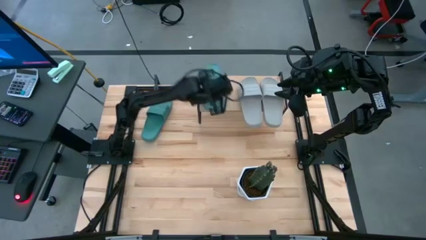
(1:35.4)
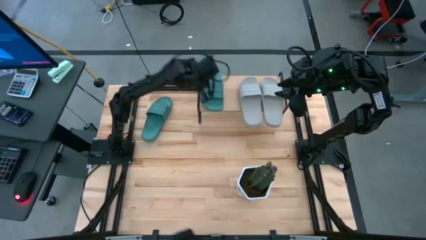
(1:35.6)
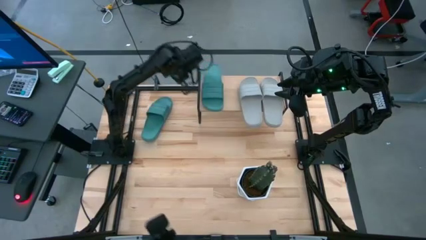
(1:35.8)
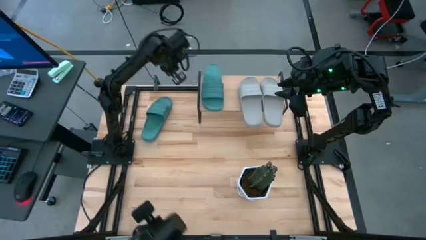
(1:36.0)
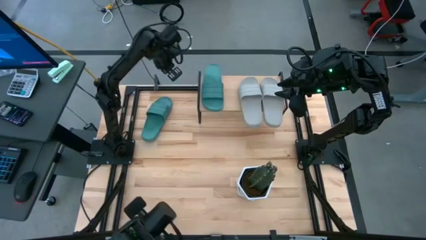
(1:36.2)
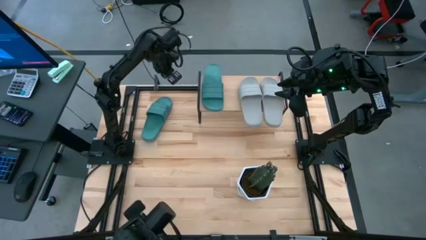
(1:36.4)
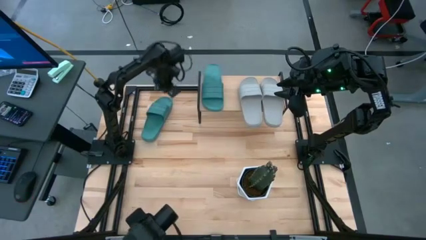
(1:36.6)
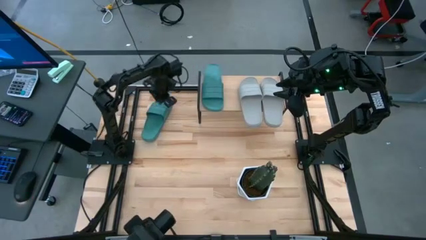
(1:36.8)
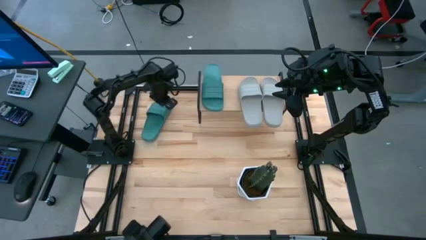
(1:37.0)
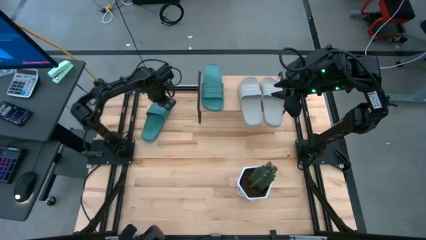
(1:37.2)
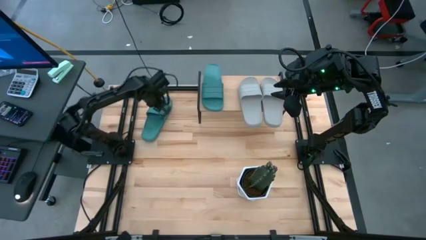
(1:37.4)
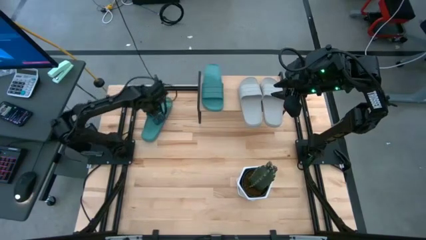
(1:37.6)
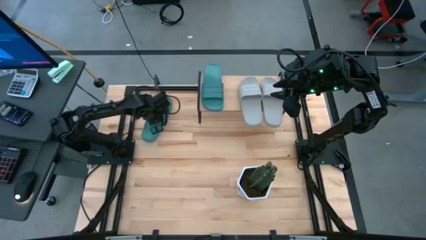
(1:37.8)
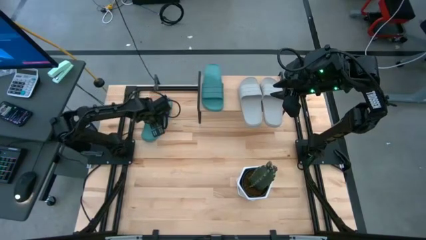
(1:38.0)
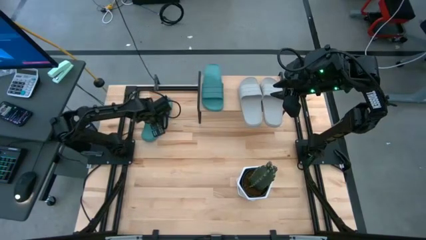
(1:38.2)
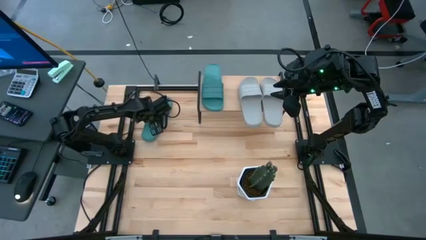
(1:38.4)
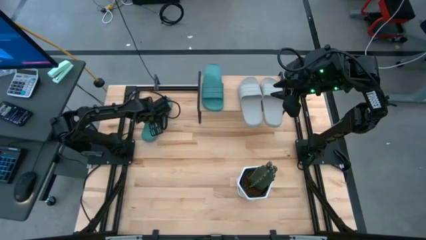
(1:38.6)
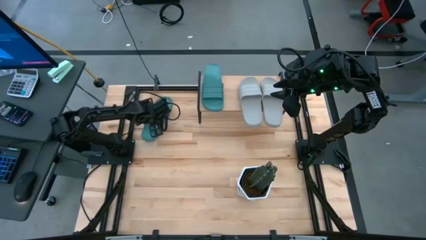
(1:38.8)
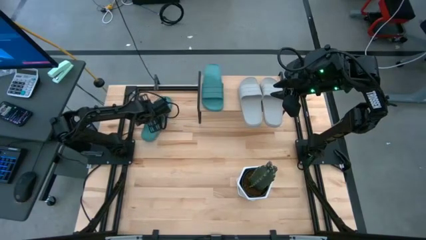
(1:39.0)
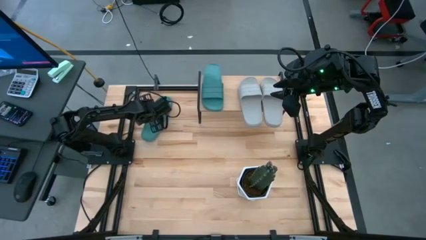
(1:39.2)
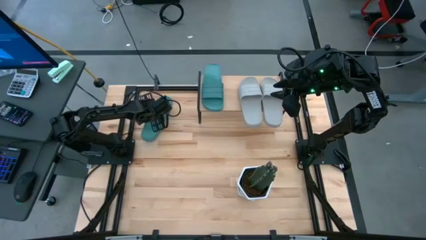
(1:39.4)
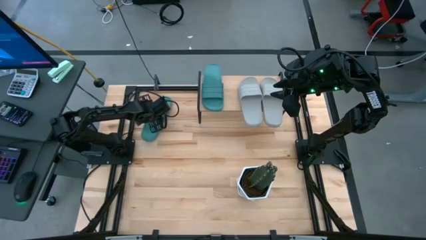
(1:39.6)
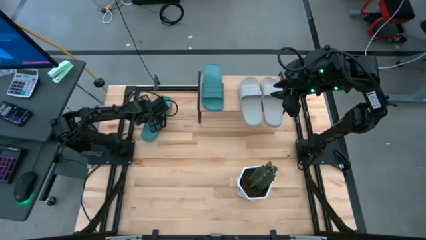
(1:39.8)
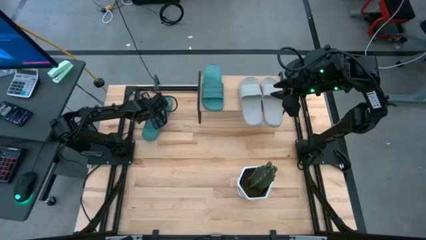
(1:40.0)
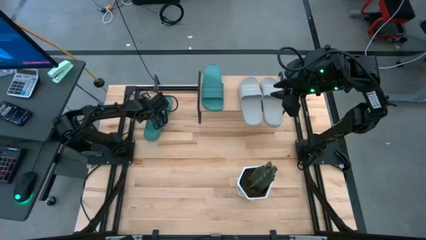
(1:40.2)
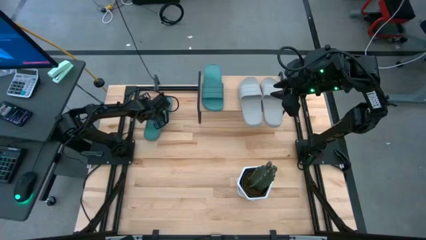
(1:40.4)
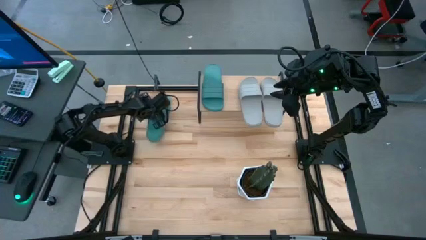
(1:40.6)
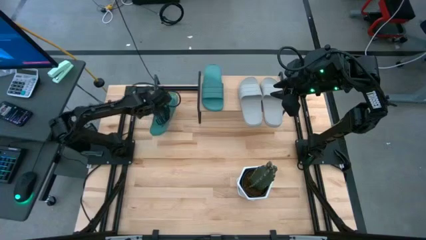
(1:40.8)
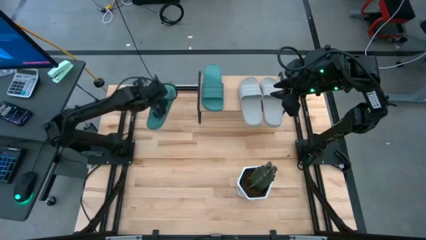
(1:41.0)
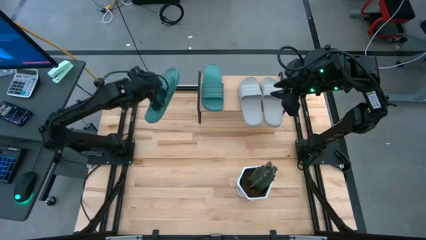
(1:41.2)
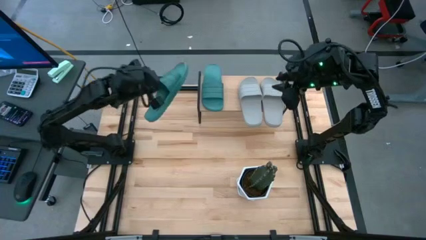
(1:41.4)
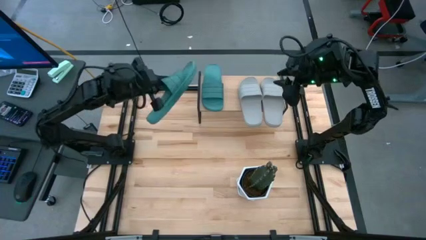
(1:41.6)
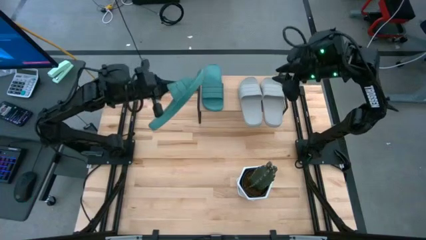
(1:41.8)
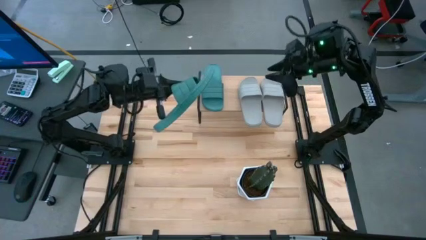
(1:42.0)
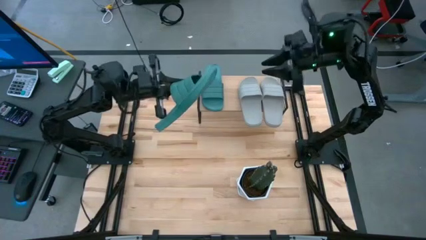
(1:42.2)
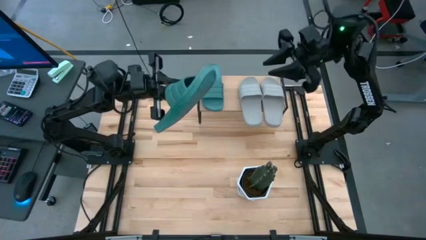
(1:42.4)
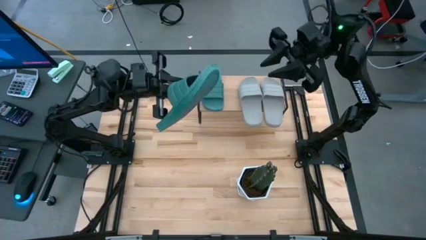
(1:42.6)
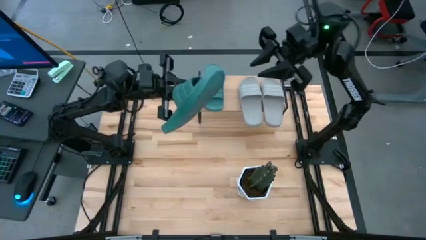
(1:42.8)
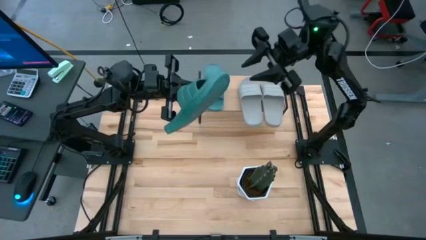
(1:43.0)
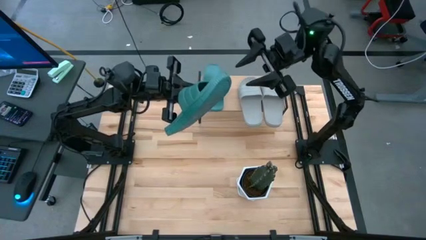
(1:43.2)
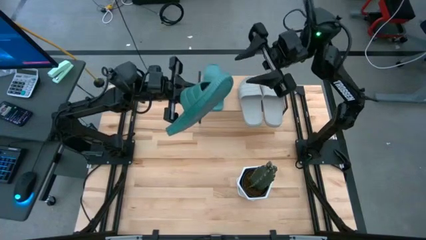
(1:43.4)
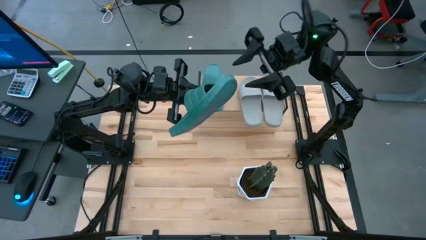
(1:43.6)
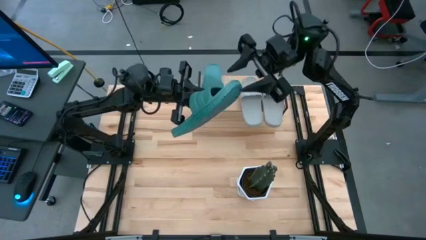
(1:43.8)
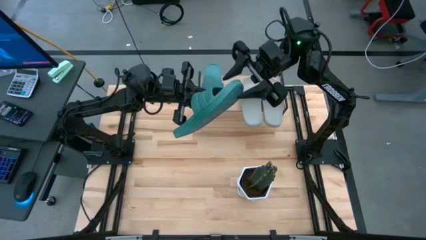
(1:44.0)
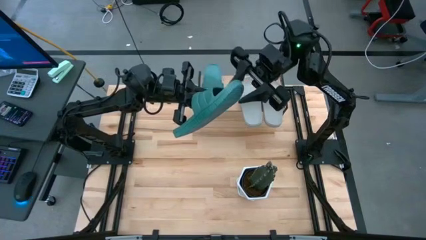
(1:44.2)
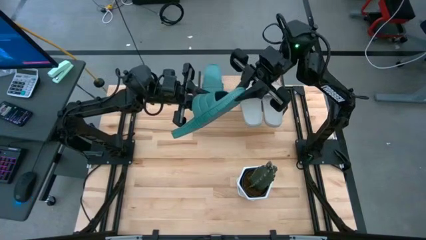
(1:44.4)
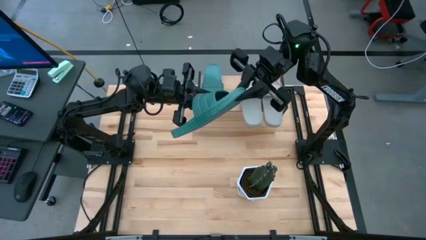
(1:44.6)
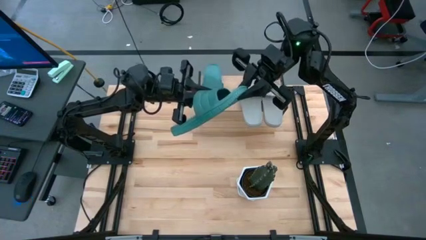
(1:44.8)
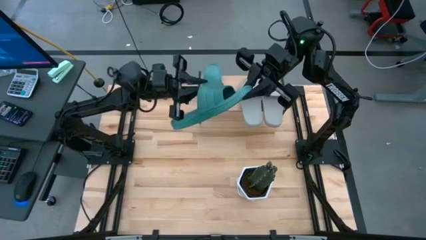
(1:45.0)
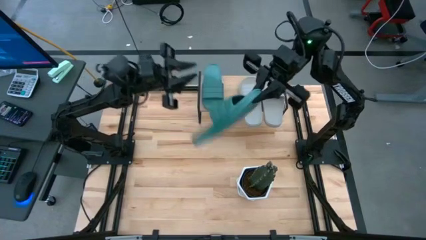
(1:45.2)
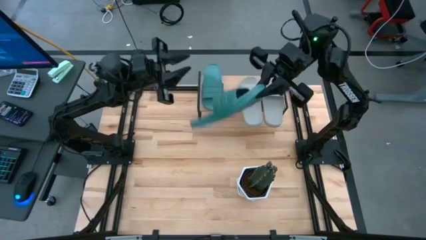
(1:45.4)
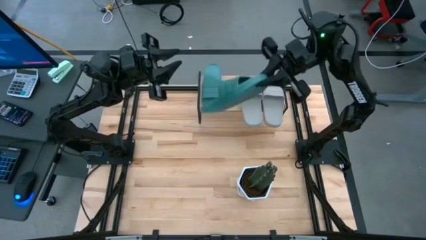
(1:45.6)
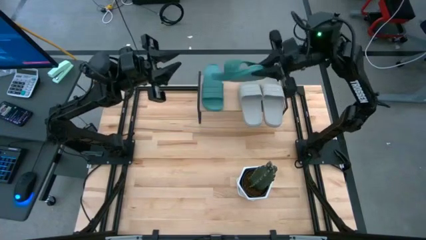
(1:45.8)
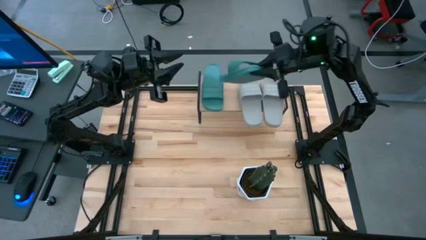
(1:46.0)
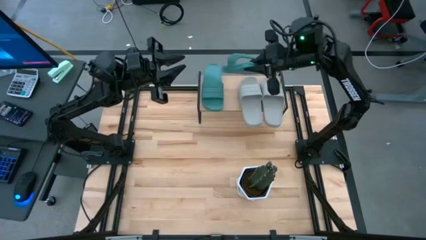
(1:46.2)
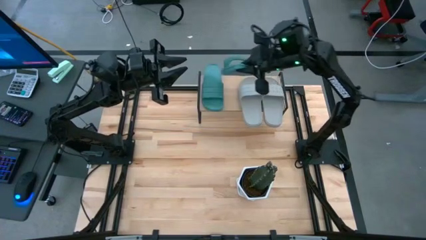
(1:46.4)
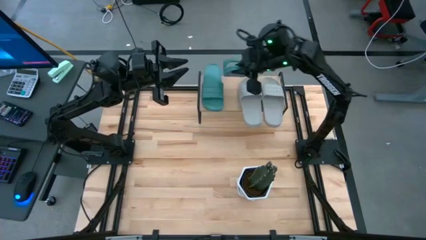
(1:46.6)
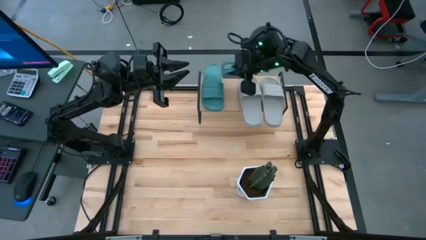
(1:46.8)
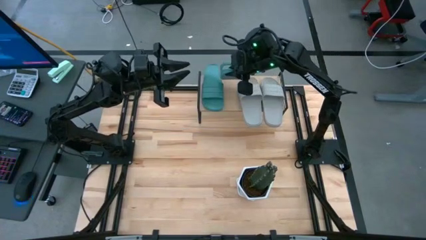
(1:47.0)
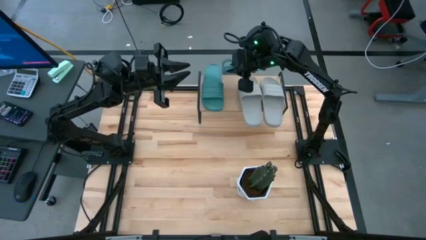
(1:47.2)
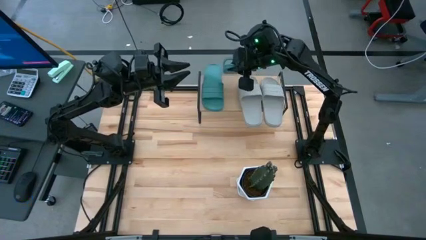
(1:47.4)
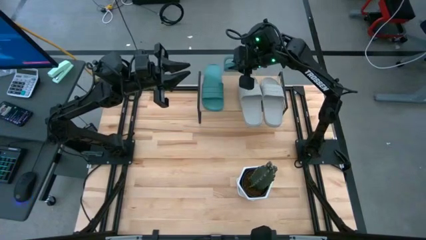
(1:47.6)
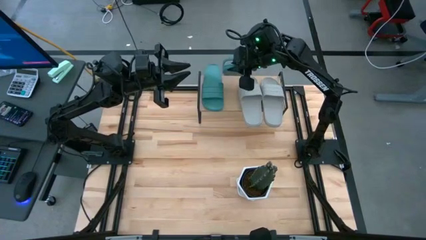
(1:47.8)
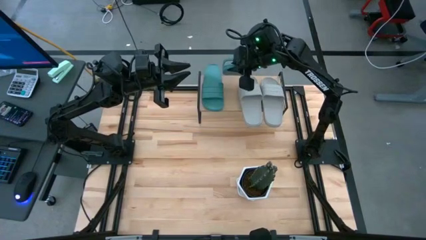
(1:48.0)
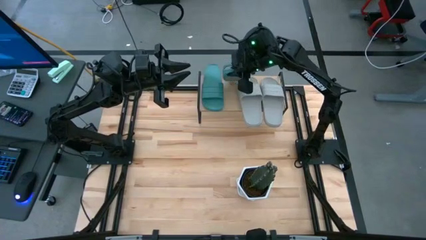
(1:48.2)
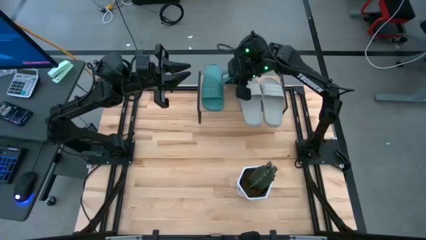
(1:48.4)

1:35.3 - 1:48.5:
Task: Pick and place slides into the shelf
Put the green slipper on the shelf
